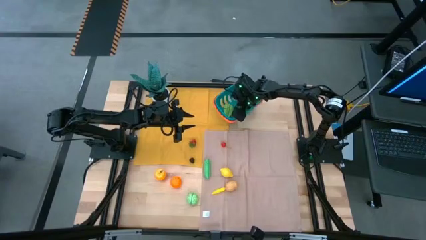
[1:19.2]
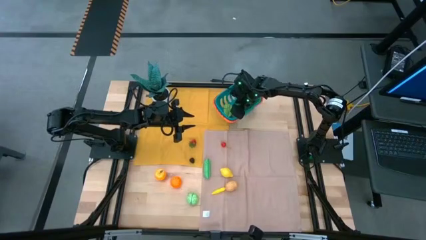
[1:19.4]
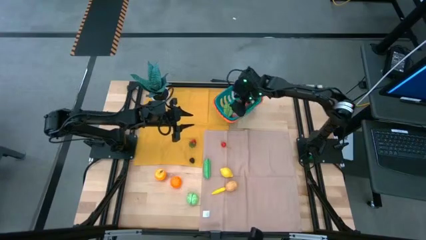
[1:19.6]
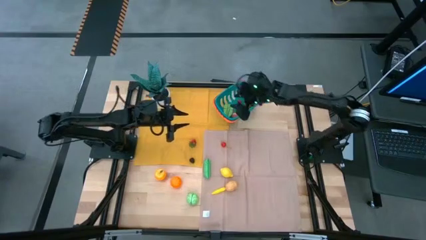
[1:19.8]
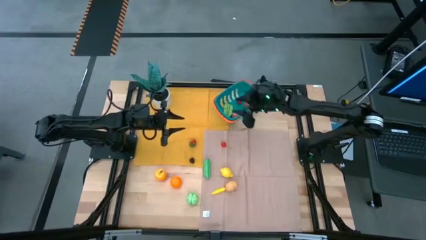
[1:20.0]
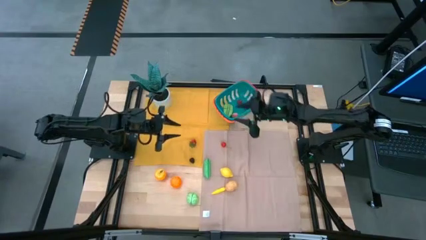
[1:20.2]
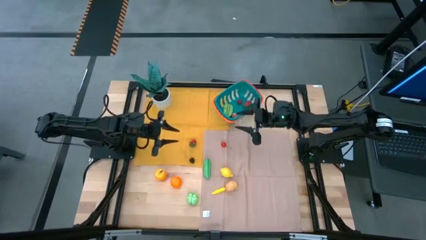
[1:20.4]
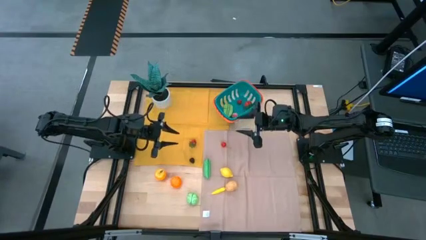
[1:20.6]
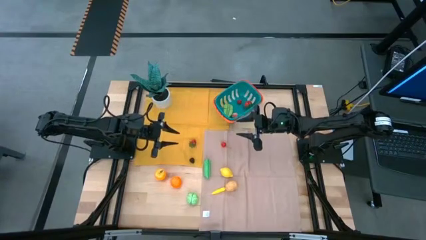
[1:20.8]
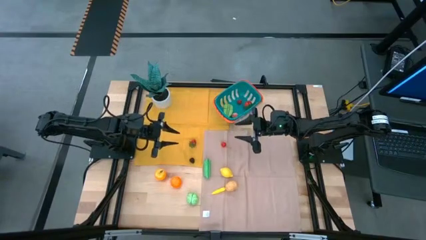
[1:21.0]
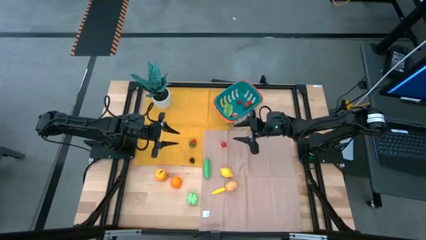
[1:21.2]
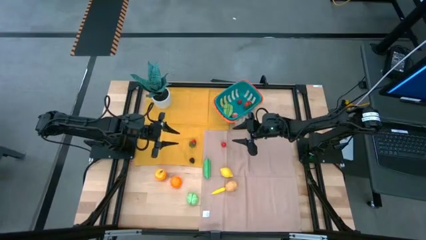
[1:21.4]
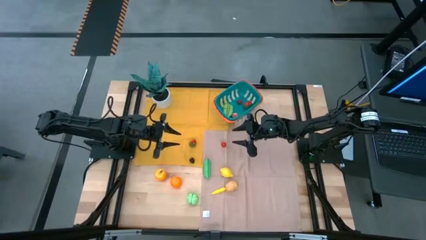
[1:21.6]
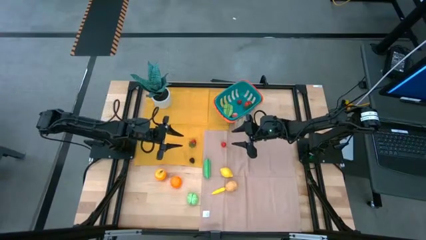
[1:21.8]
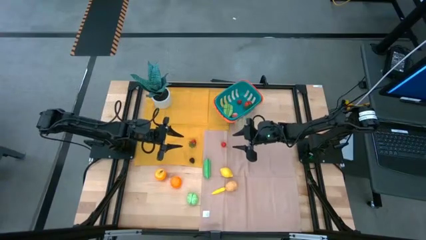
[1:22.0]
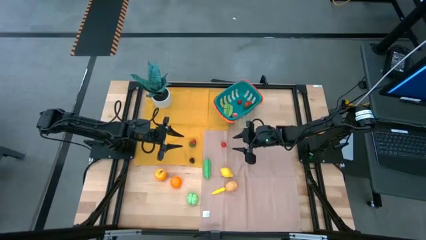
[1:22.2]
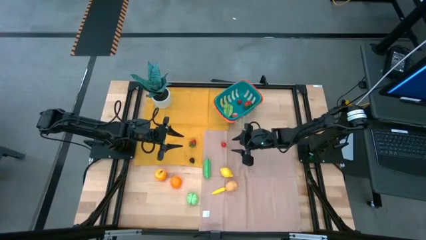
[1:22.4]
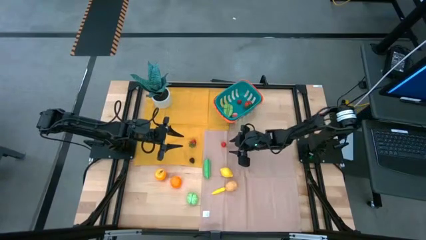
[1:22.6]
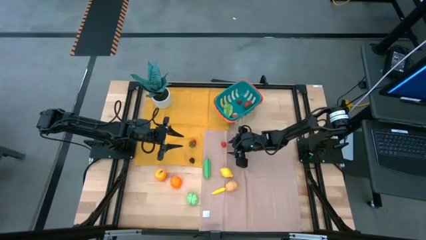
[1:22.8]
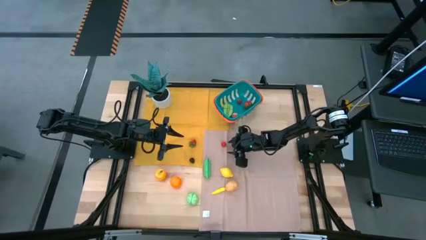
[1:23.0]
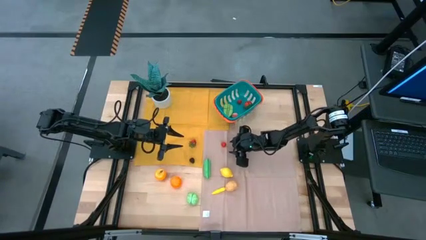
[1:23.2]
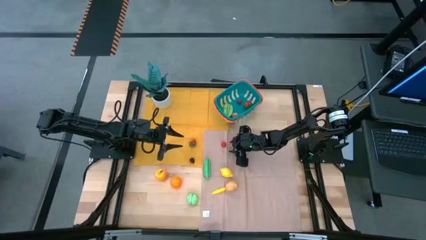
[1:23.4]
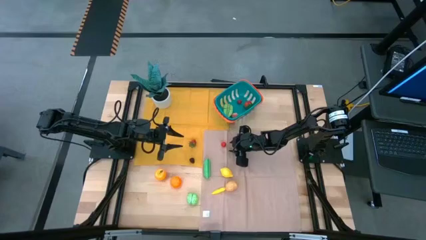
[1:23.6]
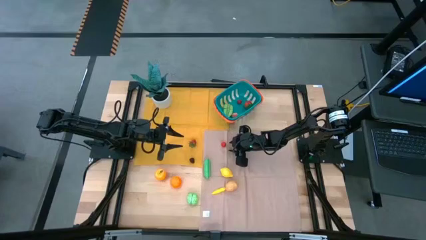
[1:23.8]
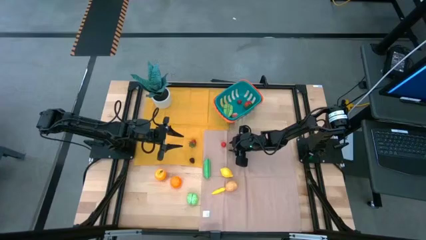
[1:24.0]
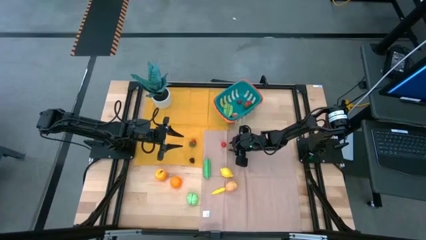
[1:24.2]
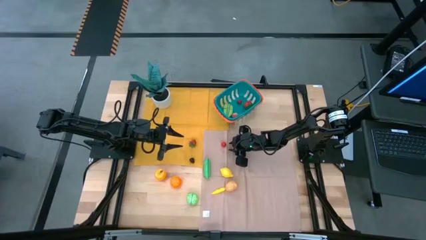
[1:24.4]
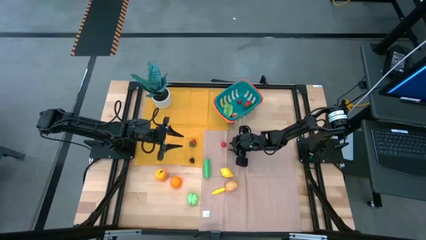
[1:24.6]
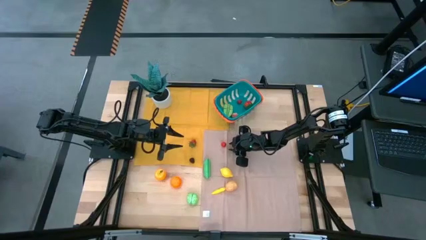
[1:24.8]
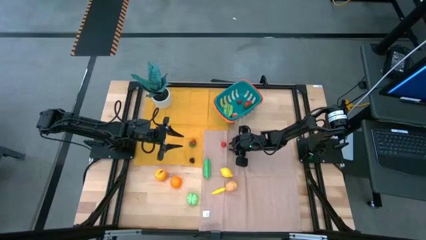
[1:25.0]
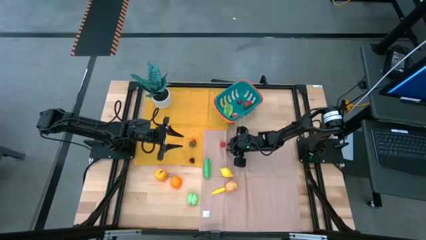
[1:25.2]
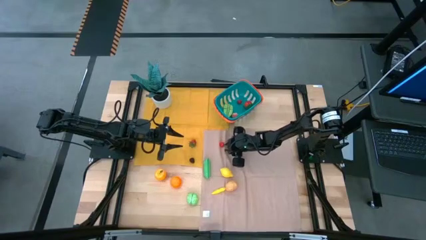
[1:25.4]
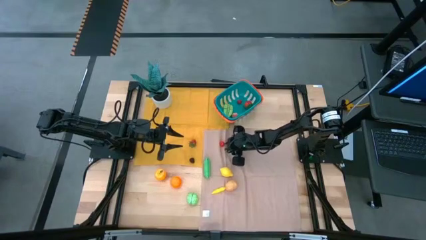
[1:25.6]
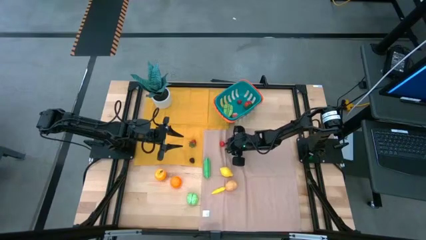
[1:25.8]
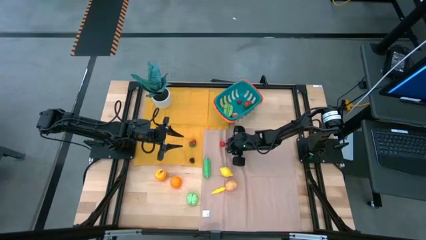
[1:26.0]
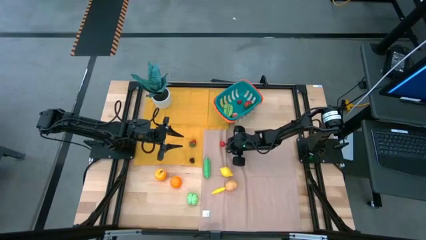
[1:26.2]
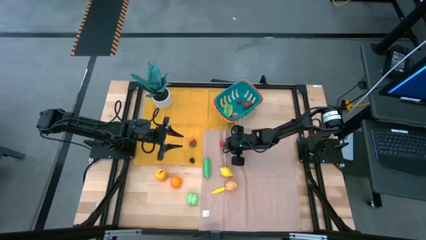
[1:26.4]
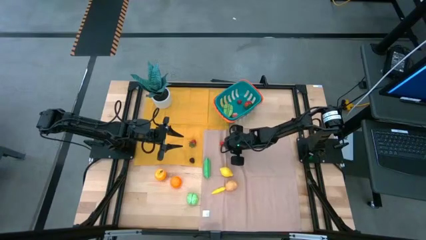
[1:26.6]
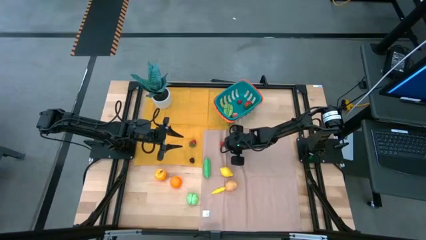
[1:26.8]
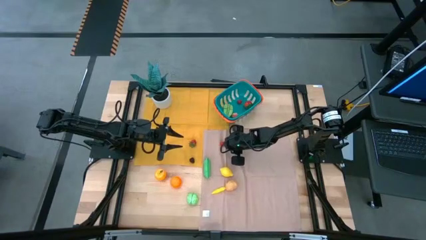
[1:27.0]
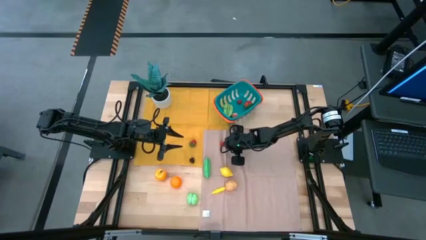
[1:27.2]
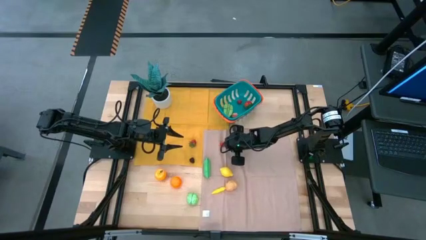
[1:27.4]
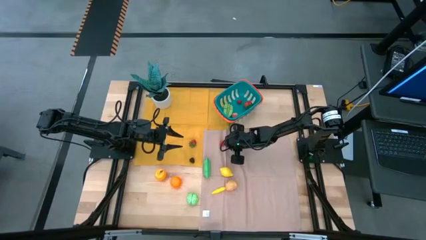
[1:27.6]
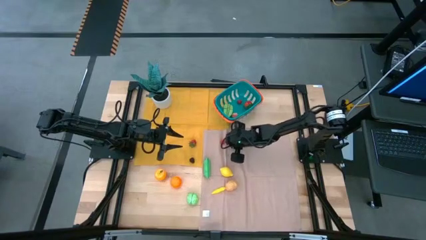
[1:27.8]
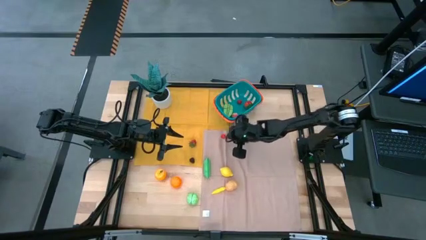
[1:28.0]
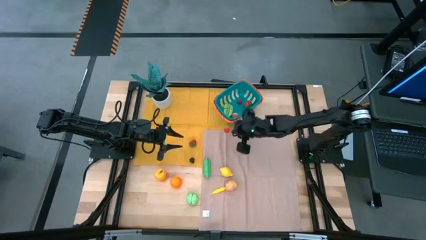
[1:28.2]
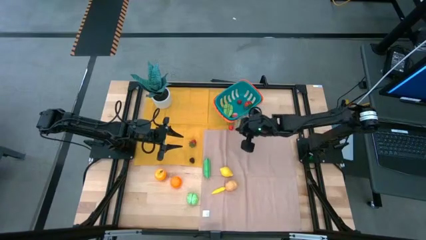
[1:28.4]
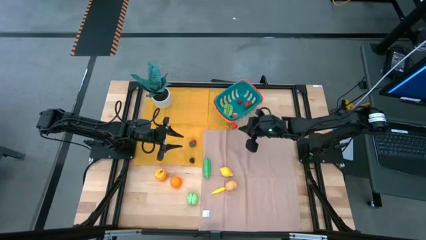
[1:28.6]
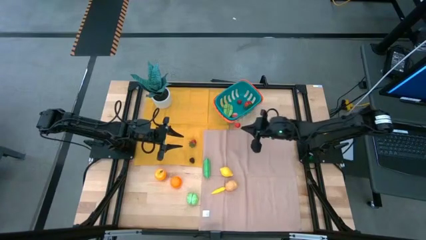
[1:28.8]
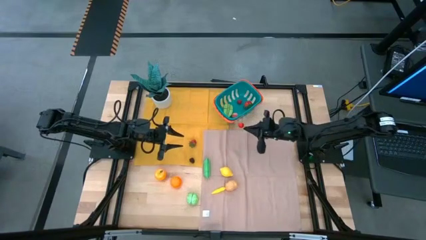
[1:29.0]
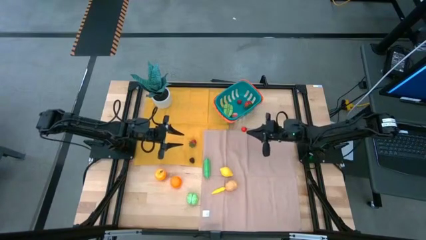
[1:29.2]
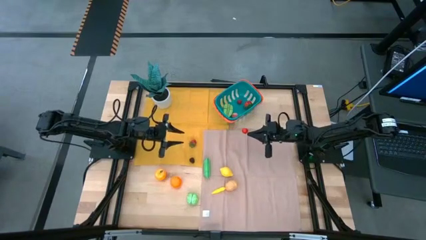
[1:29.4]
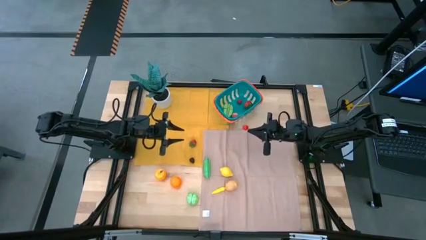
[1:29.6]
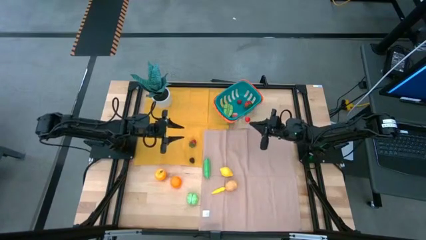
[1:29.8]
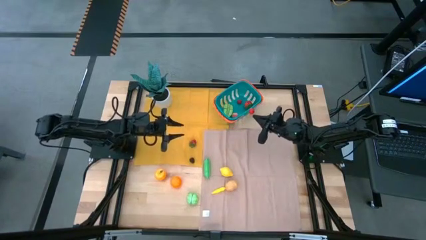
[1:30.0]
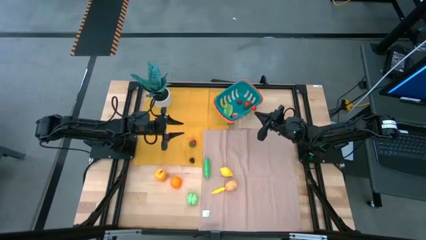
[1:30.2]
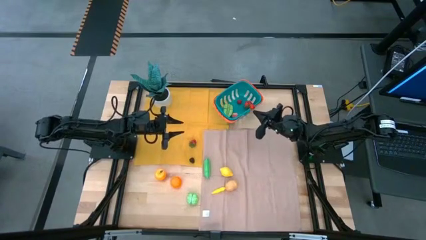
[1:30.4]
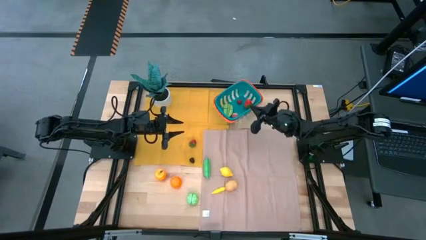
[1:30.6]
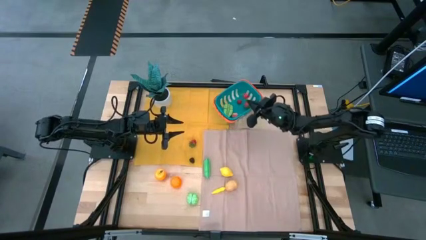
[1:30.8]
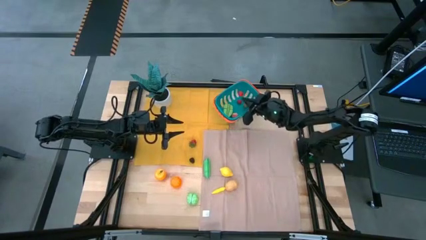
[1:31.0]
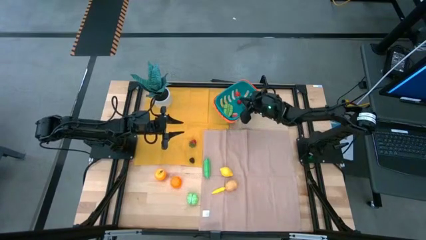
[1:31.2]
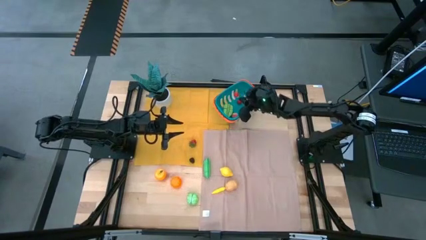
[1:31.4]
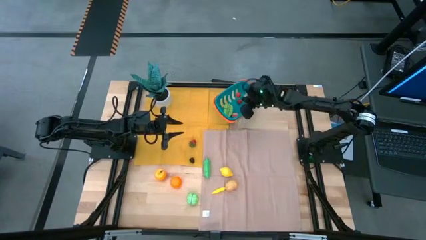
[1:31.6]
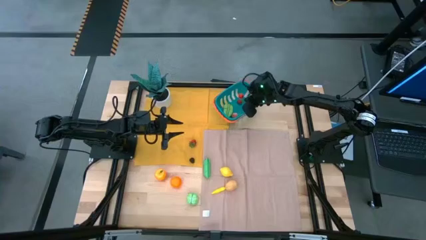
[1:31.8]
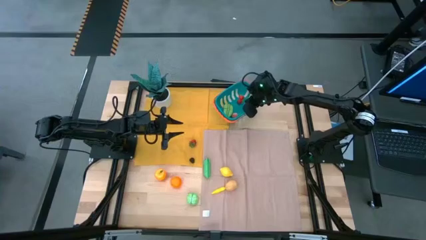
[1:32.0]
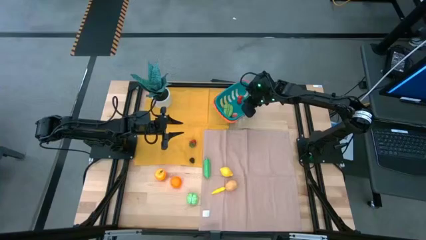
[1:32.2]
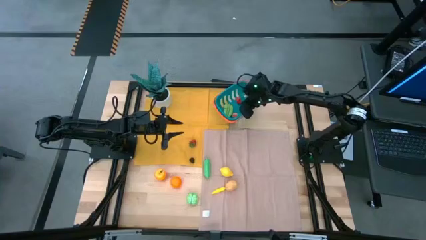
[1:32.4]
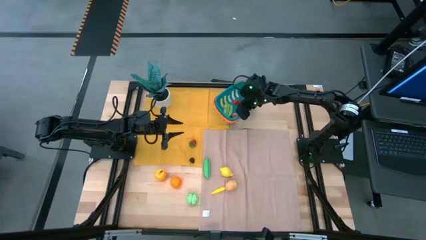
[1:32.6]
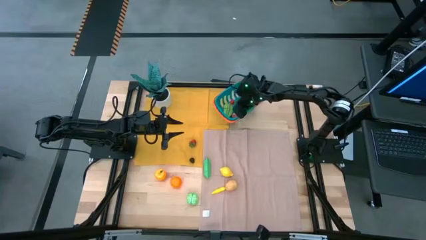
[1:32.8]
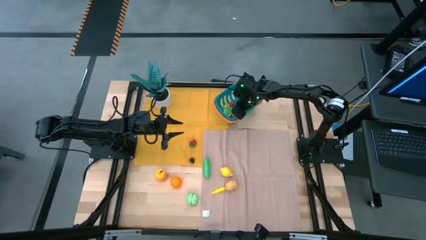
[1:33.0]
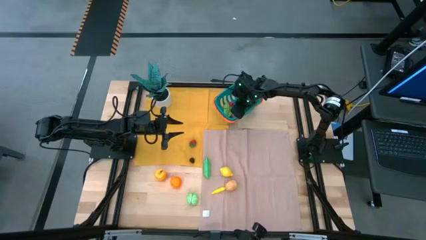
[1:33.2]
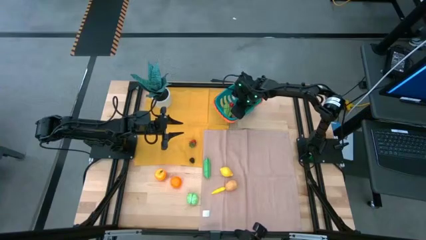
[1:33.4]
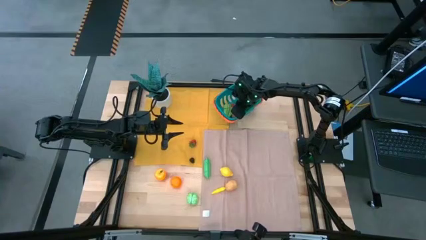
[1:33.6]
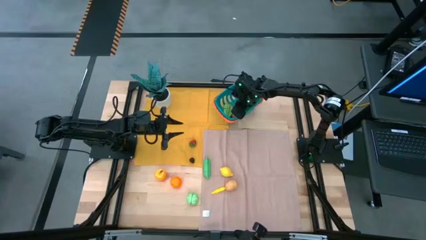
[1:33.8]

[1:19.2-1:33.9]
Task: Pick and placing Produce into tupperware
Put the cherry into the basket

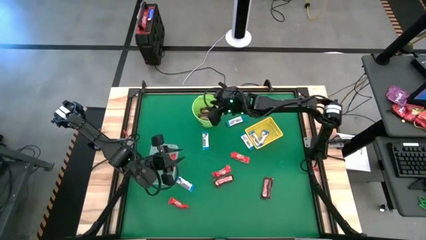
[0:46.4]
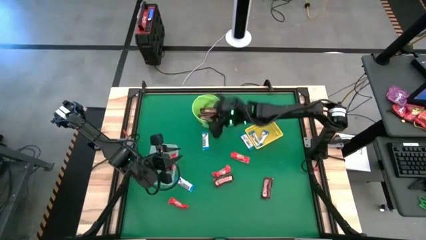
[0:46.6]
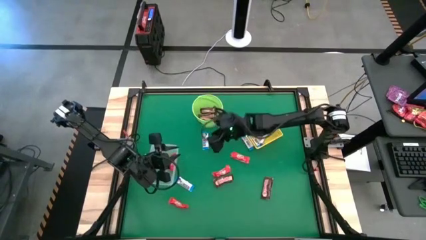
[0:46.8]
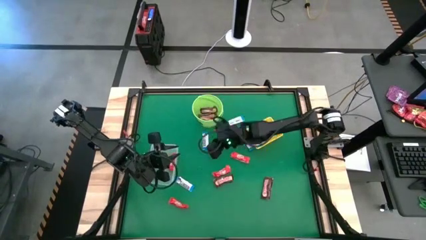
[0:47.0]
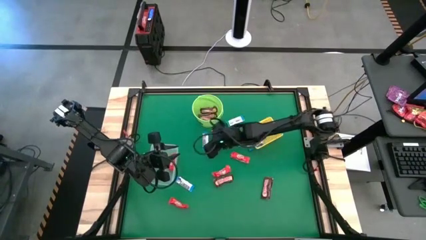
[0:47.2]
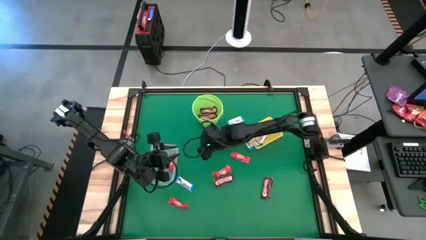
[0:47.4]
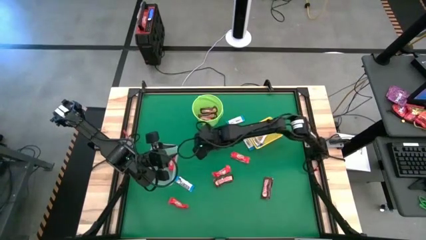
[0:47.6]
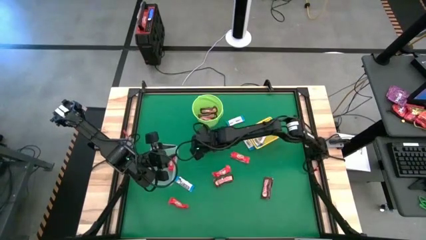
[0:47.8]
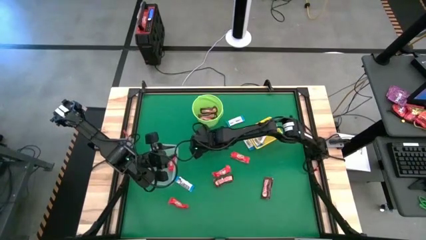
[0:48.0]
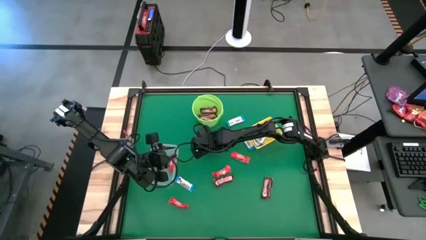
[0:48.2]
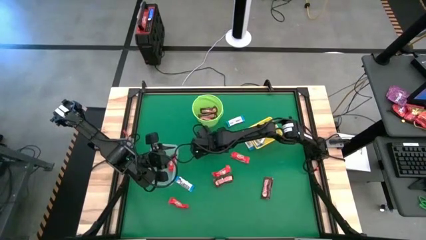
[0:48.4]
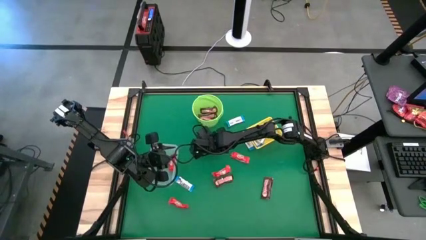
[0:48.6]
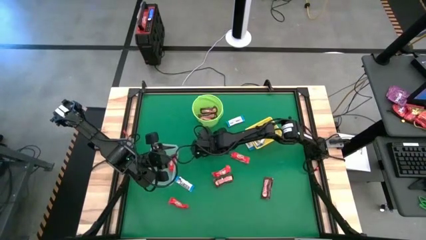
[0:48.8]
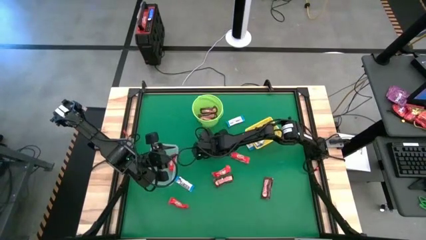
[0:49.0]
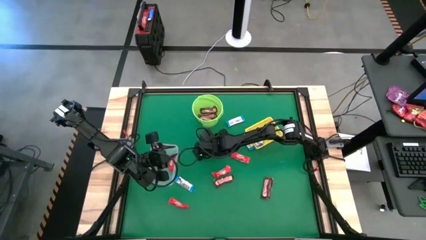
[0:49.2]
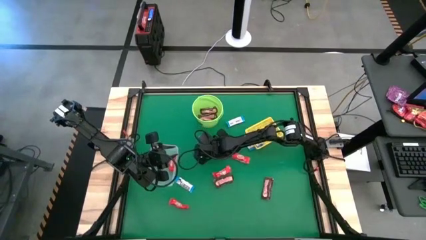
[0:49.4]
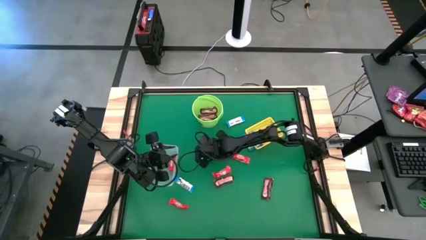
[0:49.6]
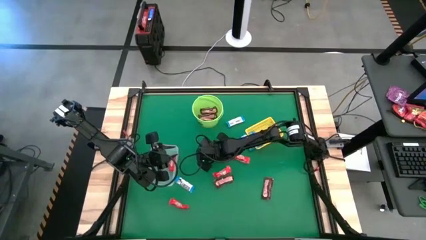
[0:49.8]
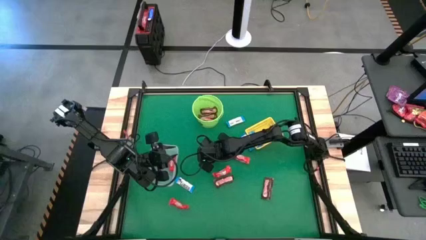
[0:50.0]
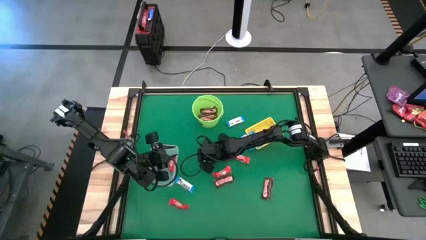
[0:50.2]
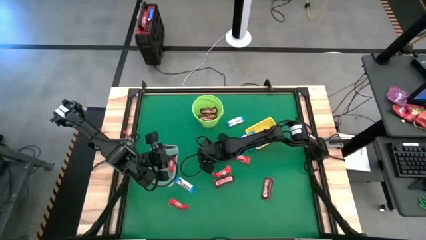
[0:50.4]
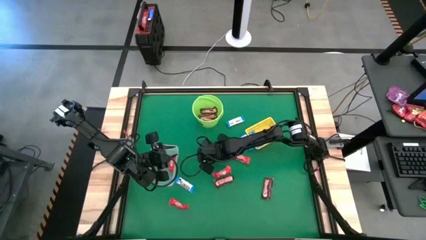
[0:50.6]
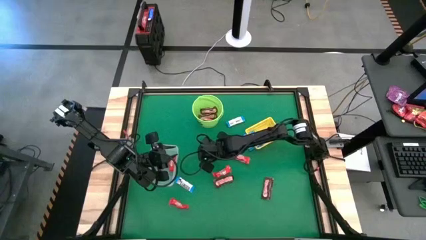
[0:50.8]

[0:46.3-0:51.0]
Task: Sort candy by brand, put in halloween buckets
Put the white chocolate bar into the yellow bin
